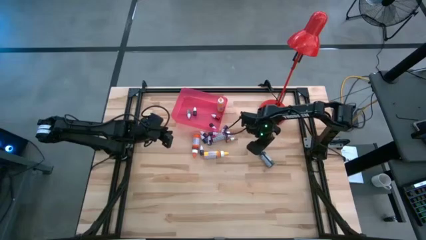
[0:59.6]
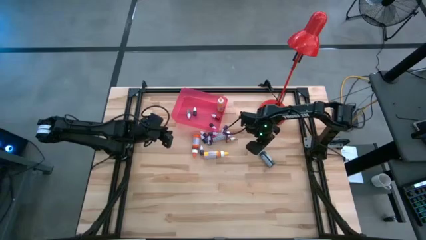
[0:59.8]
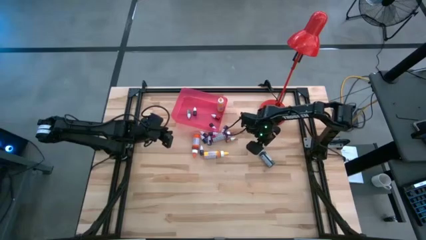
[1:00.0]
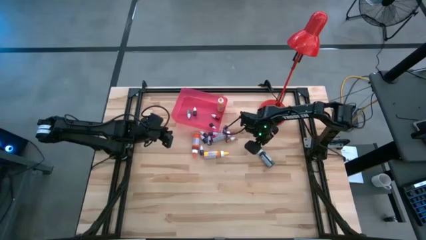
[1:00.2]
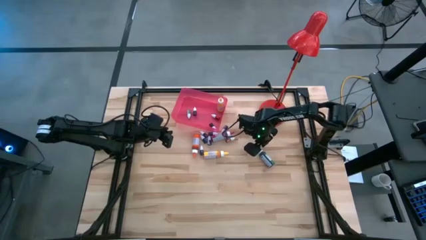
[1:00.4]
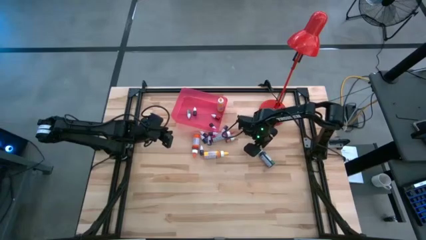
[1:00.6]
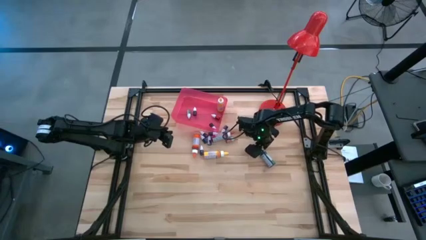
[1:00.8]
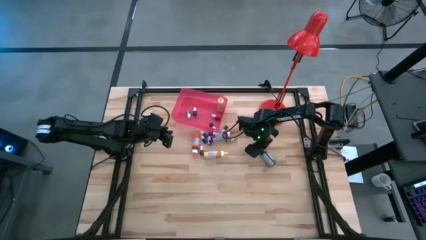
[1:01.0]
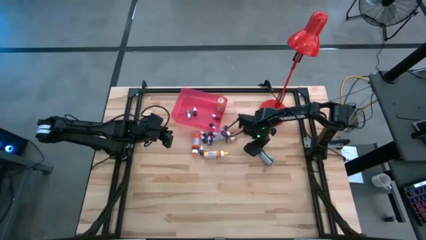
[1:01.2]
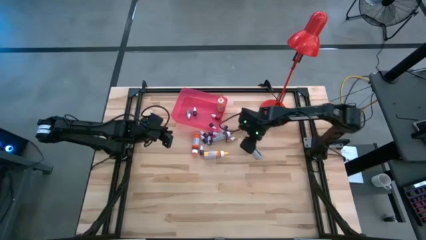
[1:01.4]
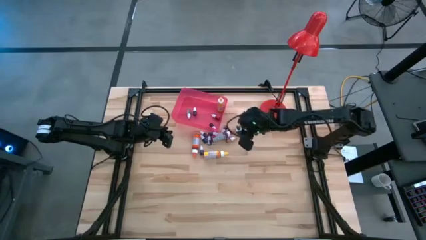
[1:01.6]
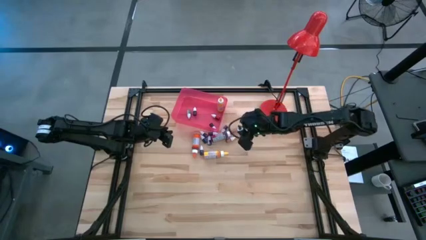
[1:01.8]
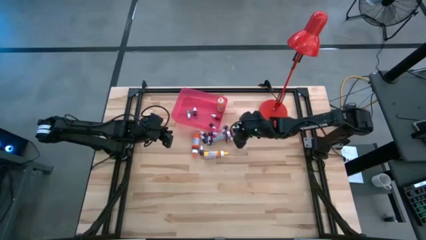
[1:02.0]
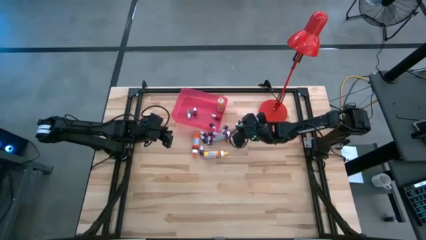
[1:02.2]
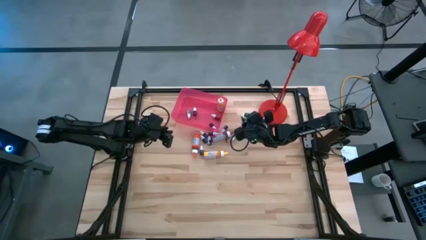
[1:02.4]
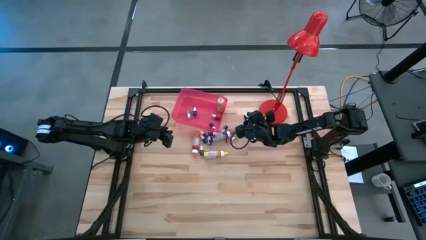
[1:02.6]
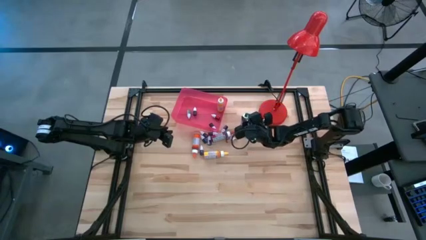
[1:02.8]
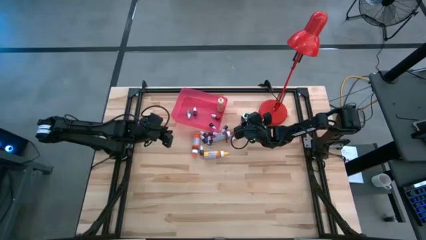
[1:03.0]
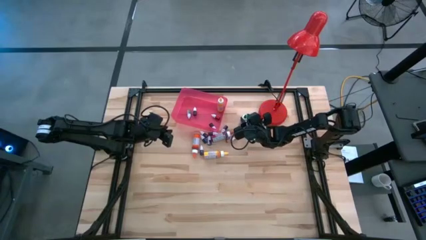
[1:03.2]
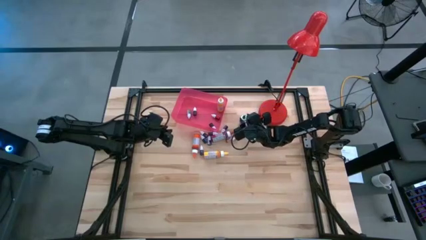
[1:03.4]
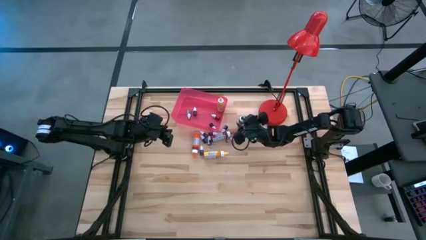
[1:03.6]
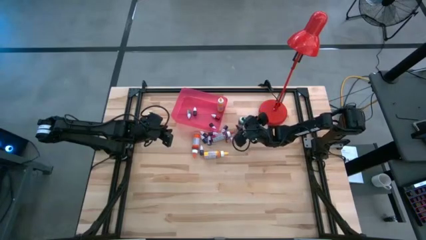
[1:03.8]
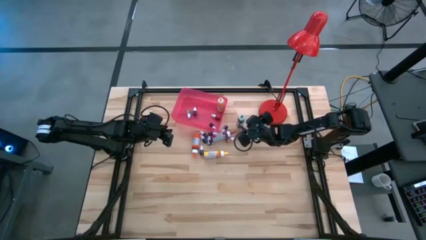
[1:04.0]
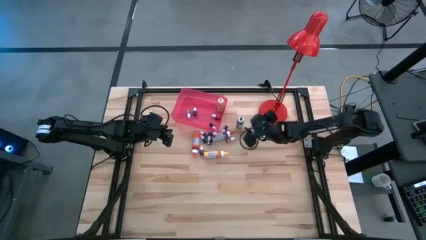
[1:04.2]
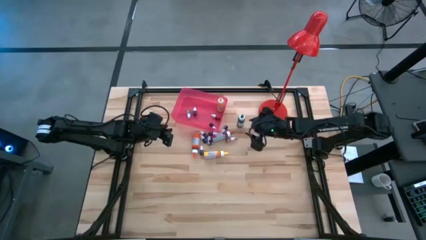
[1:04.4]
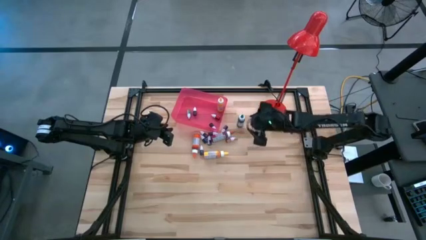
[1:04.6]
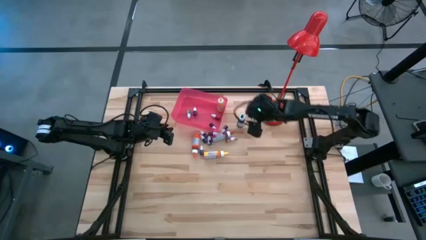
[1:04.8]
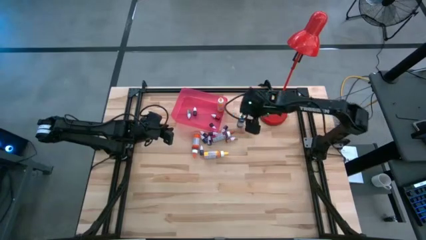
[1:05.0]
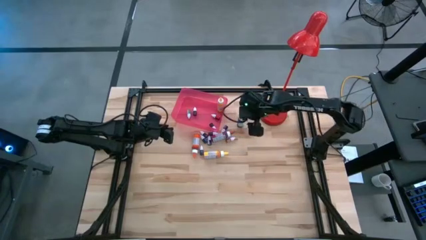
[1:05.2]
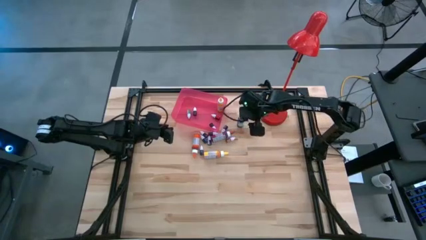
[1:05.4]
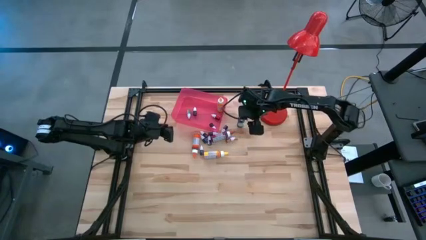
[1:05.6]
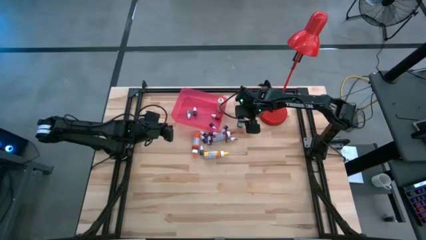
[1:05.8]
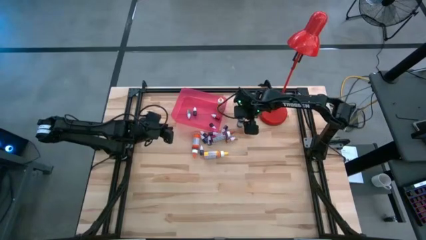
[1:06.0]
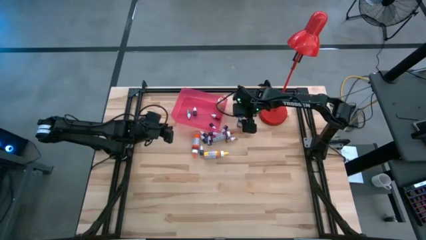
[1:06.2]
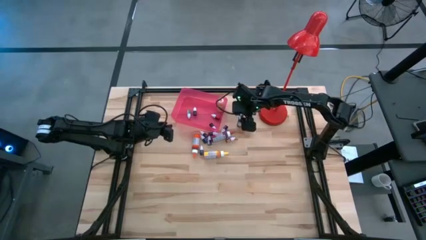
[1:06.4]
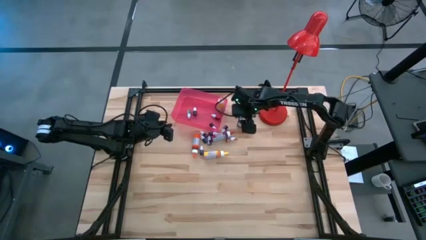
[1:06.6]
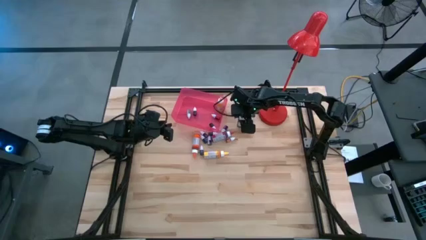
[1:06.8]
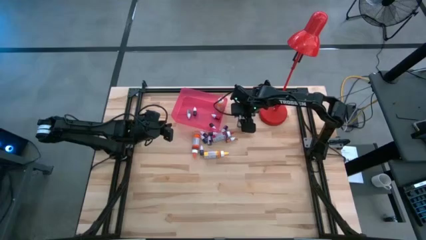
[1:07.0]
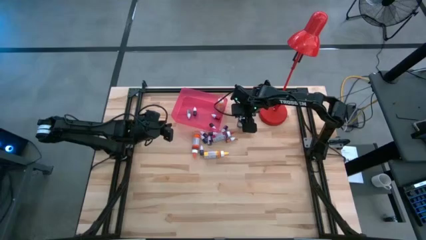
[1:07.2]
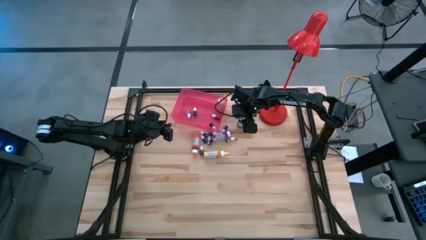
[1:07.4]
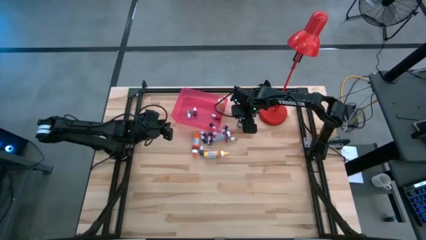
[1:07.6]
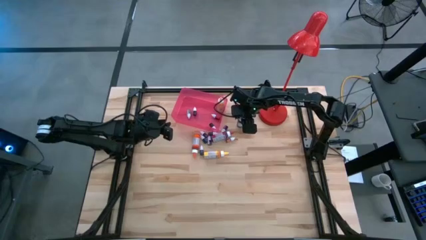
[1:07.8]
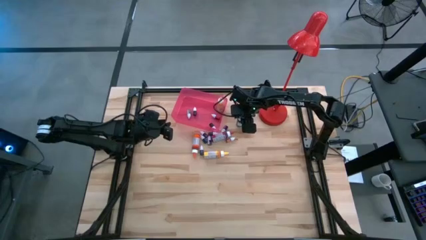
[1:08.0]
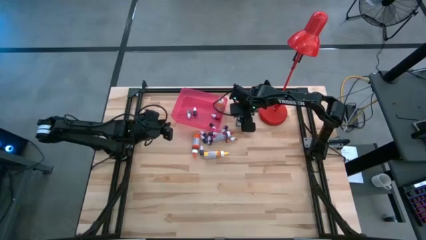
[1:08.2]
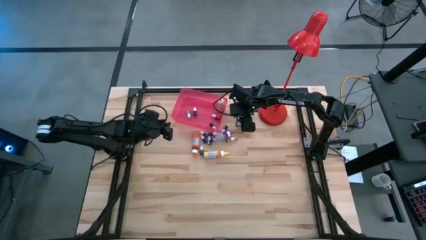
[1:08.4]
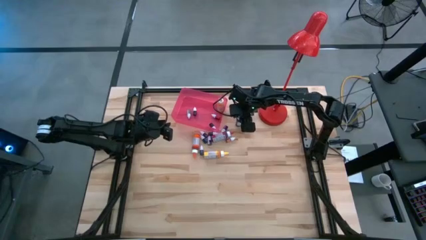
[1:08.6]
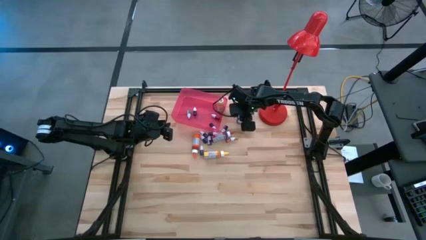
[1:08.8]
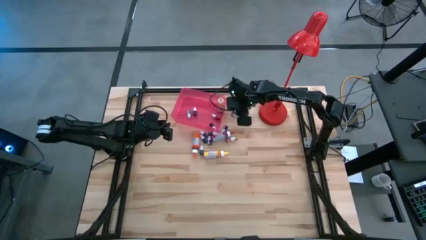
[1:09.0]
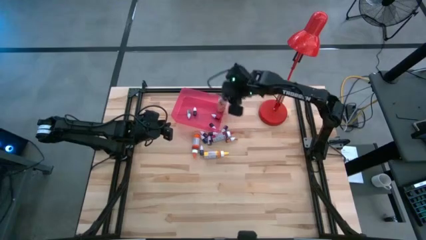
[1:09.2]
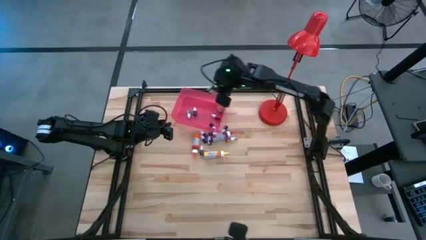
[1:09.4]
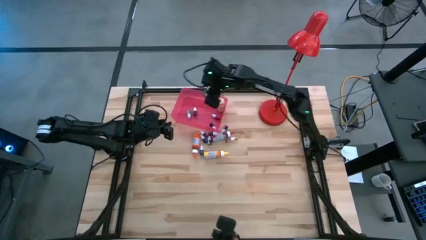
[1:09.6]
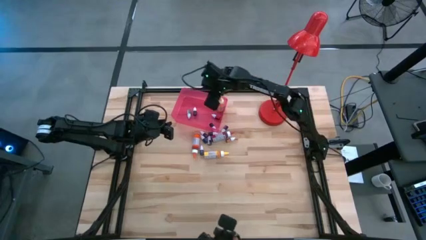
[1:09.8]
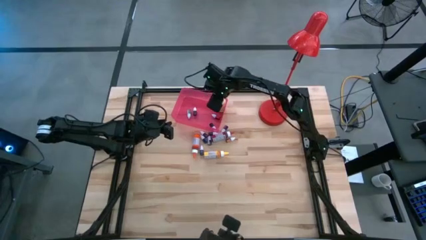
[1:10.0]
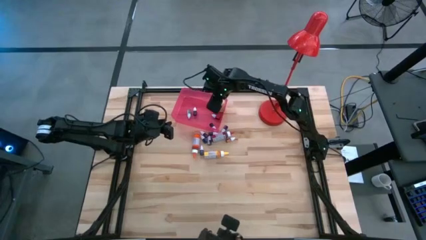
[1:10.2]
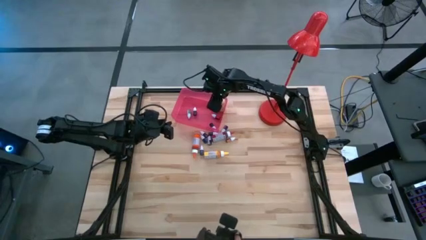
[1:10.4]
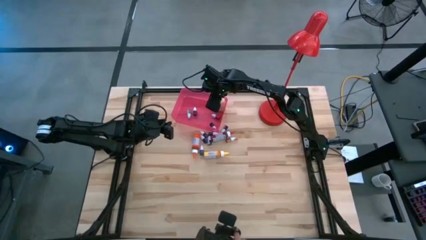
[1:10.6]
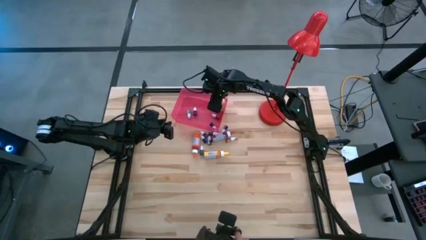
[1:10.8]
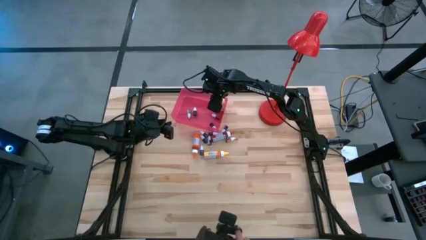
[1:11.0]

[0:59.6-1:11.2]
Task: Pick & Place food coloring
Put the big green food coloring bottle into the red bin

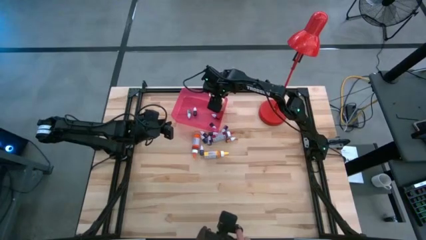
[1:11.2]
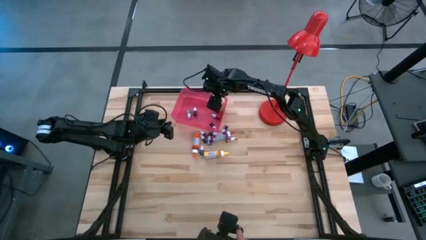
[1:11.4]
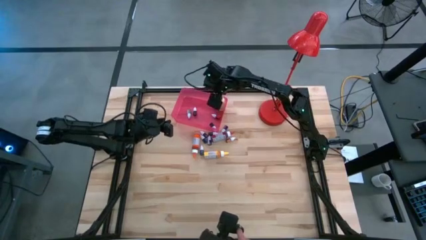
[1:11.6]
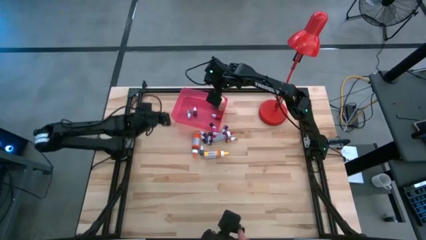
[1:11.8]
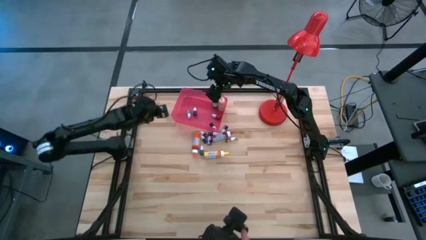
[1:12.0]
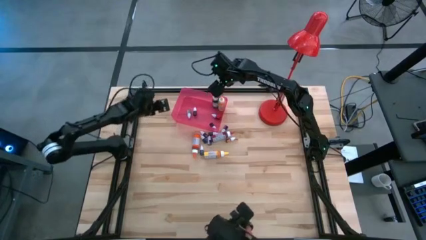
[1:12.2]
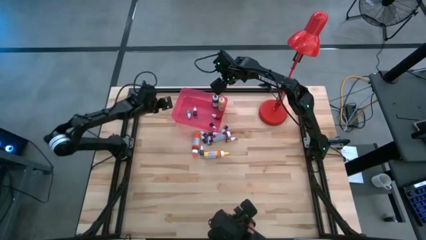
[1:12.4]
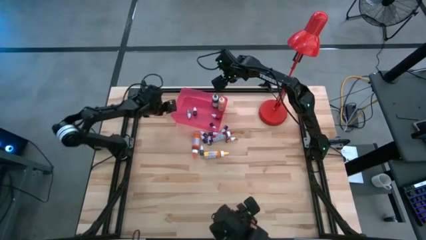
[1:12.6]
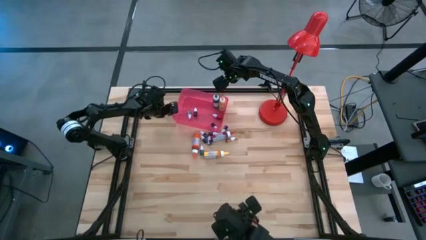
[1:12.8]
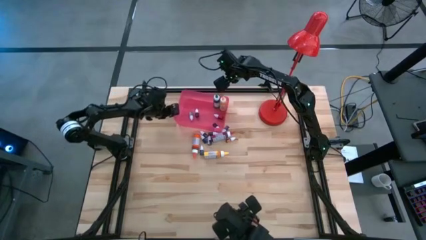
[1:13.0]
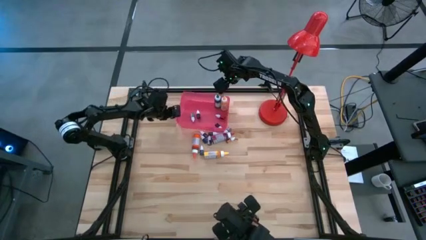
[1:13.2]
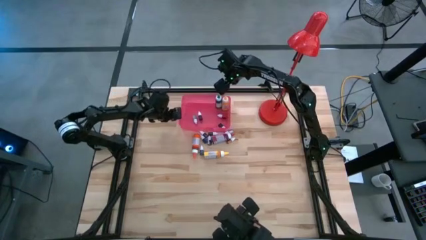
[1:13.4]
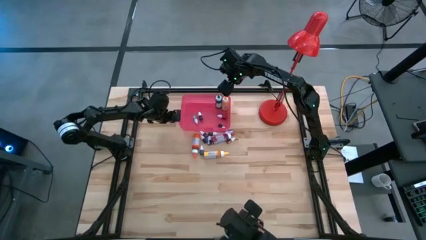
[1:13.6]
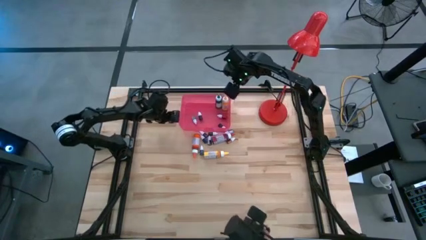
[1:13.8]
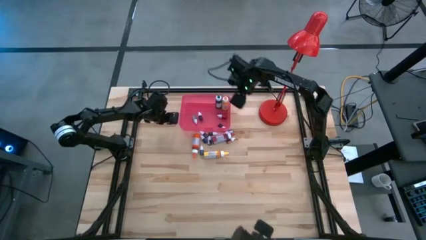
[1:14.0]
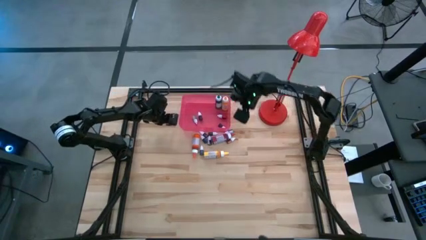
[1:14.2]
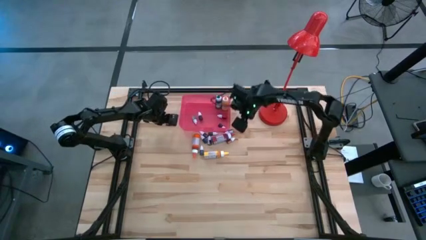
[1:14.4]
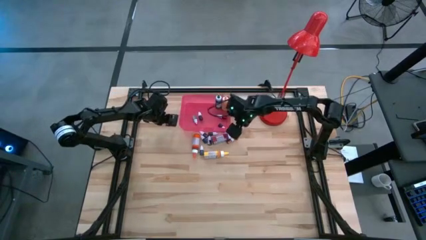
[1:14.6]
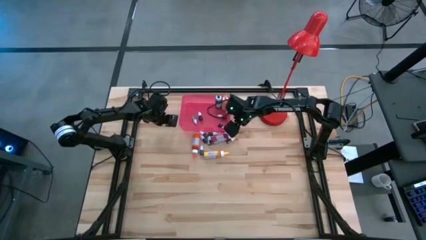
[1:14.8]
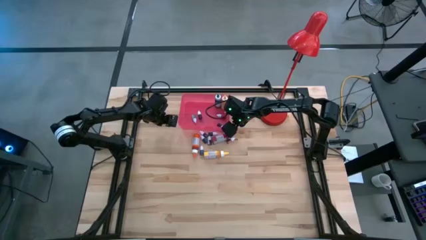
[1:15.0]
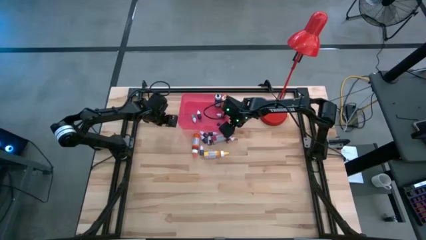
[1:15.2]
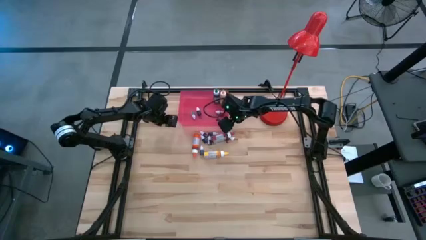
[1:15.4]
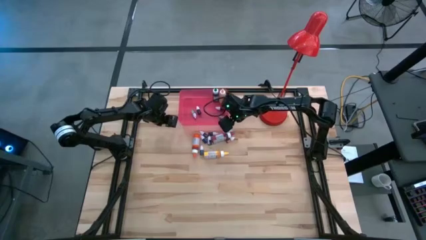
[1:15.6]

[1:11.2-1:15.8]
Adjust the red bin
